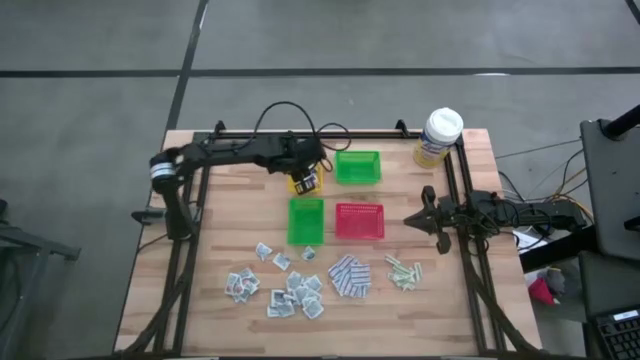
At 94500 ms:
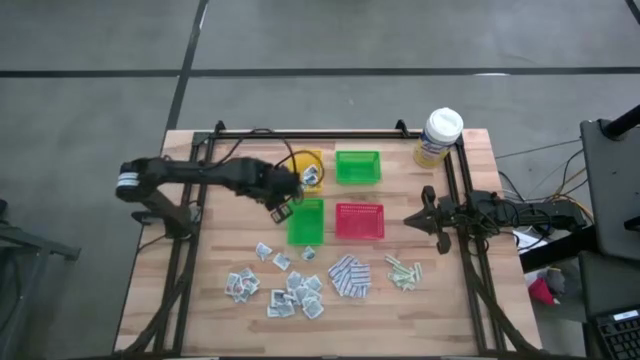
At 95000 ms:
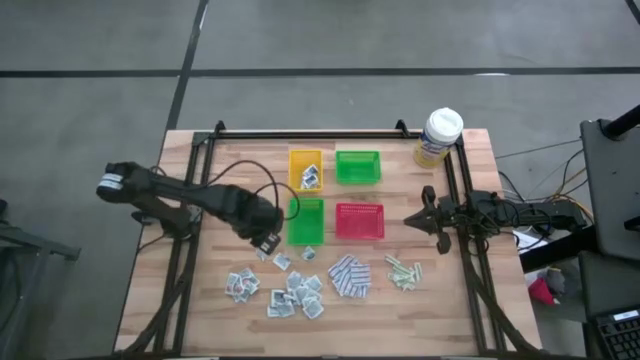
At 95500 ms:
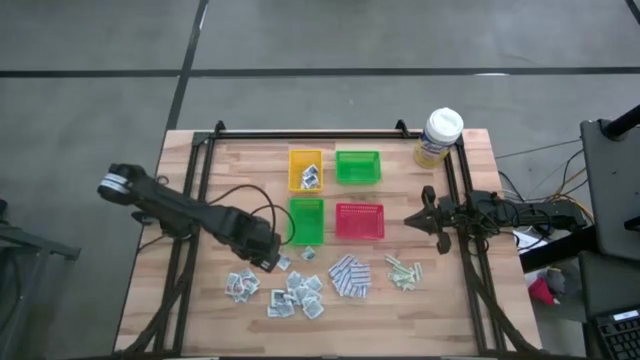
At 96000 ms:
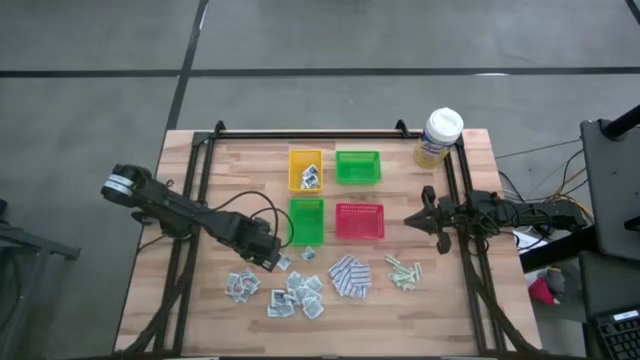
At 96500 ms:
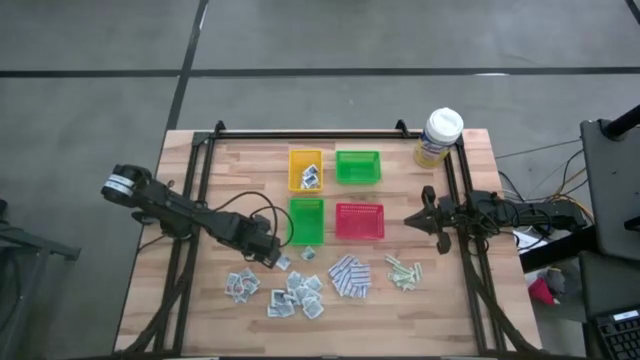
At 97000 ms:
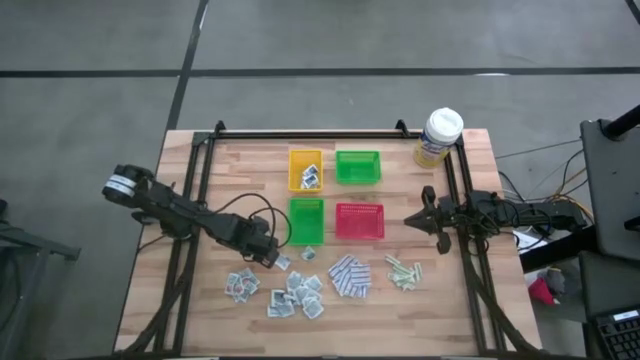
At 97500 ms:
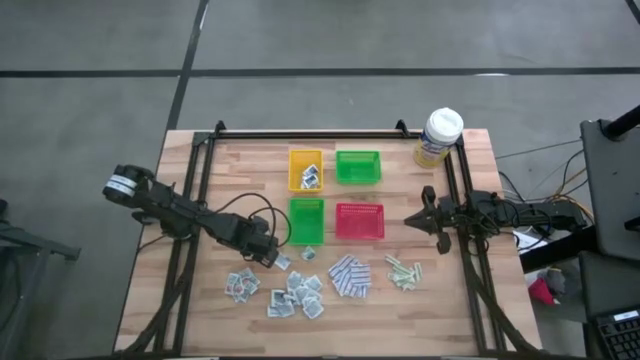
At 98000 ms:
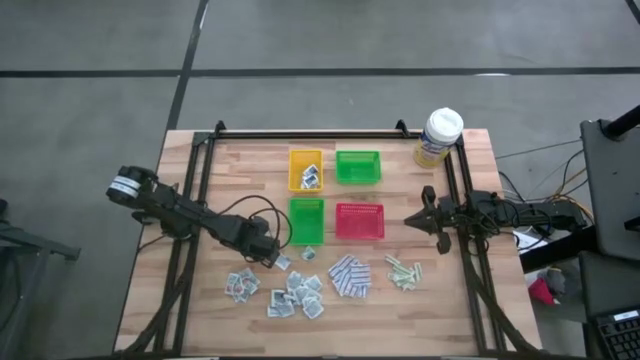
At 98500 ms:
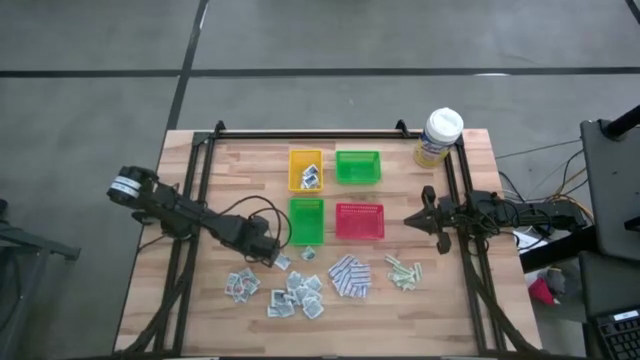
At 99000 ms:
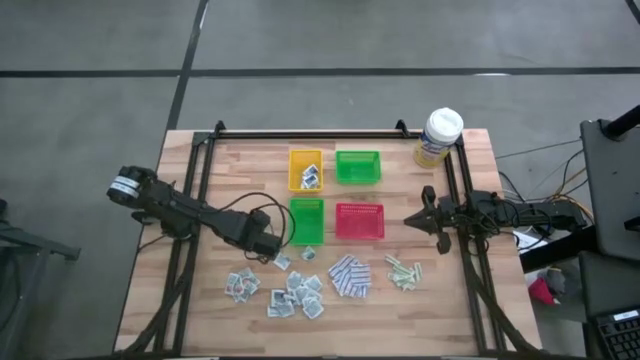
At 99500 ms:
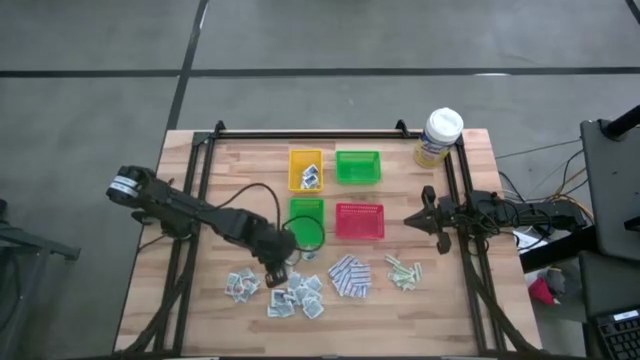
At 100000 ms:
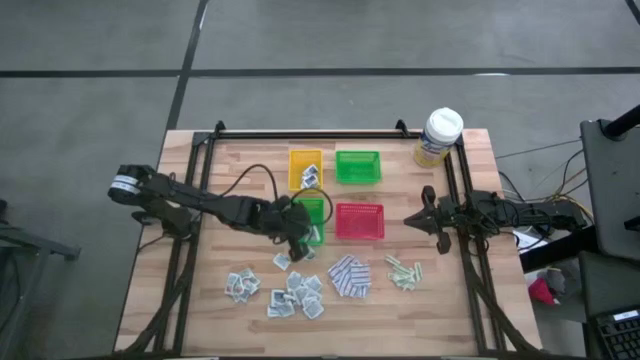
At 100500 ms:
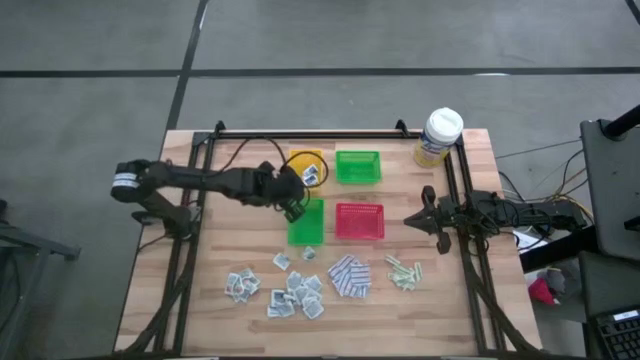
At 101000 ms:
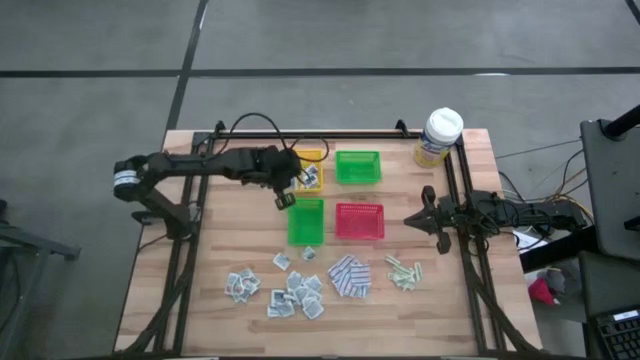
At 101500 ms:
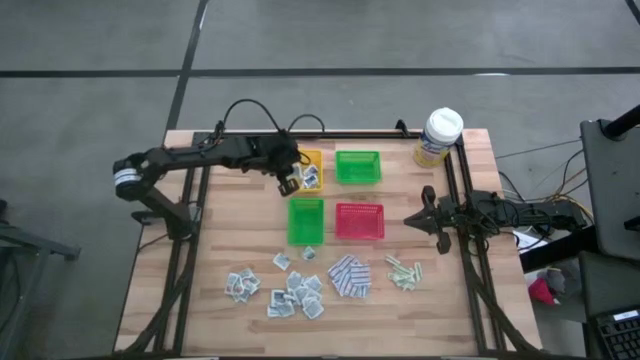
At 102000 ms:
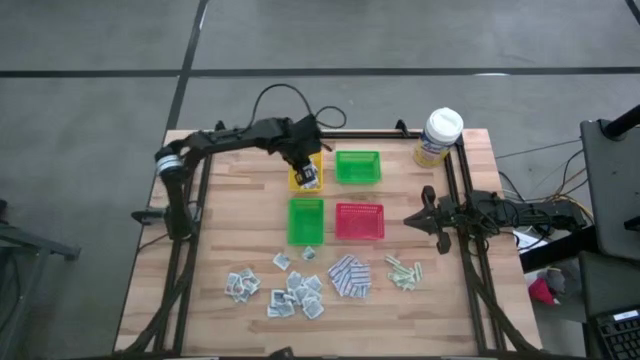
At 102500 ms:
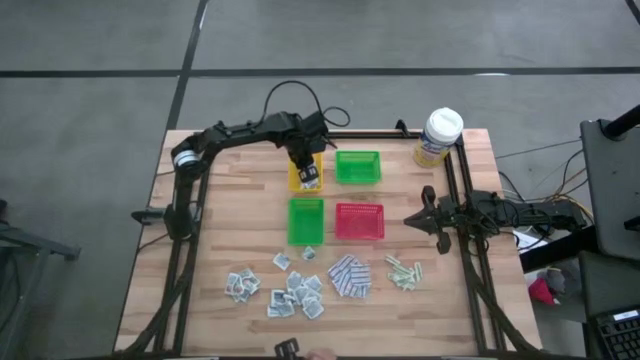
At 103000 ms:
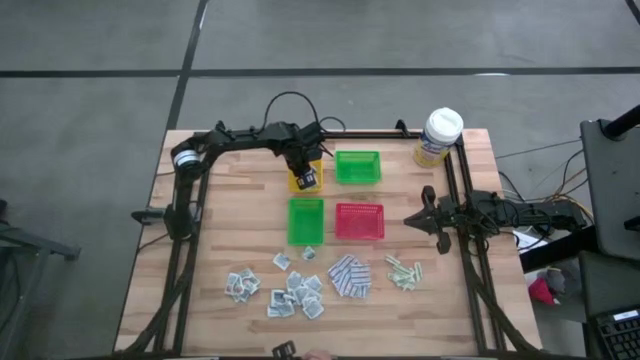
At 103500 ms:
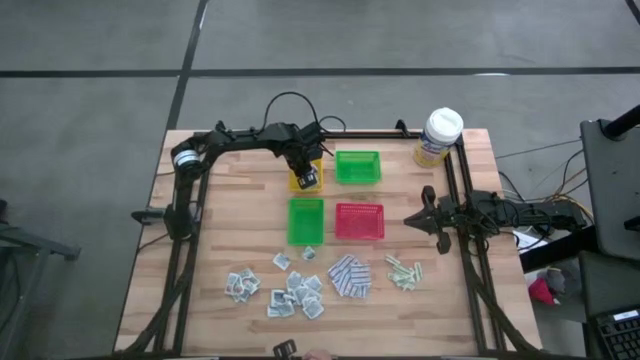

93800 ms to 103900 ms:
Task: Pick & Place First Aid Supplies
Put the blue alcohol pad into the yellow bin

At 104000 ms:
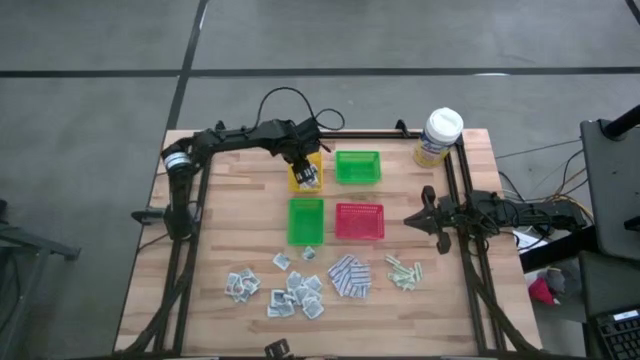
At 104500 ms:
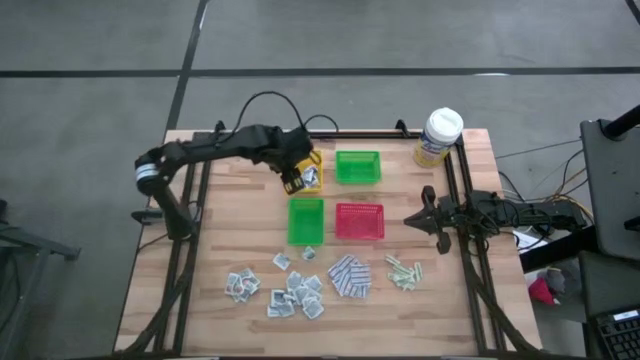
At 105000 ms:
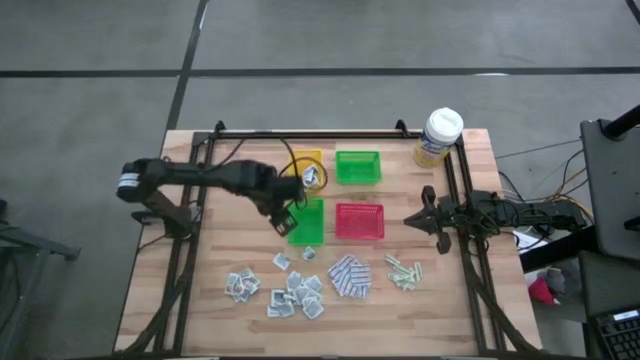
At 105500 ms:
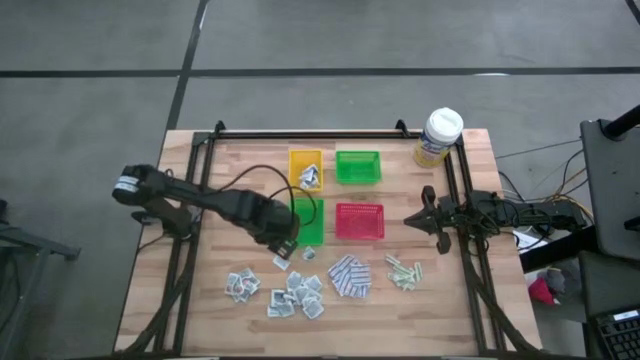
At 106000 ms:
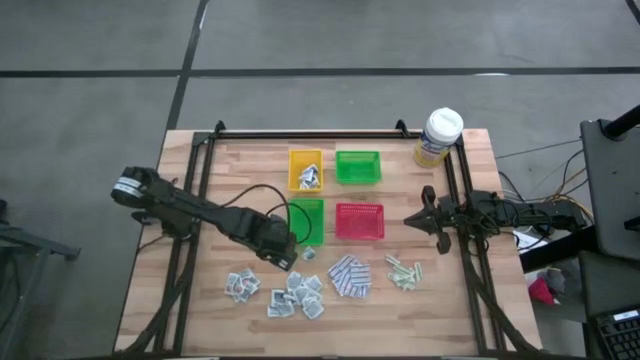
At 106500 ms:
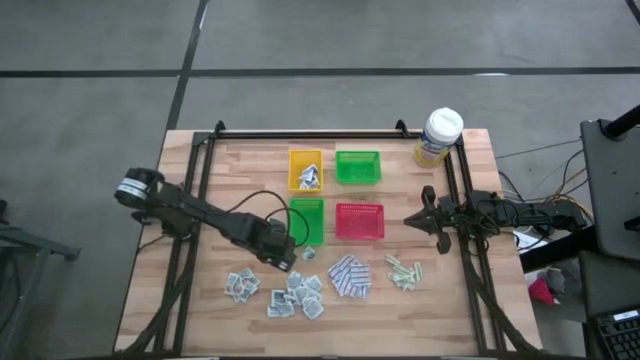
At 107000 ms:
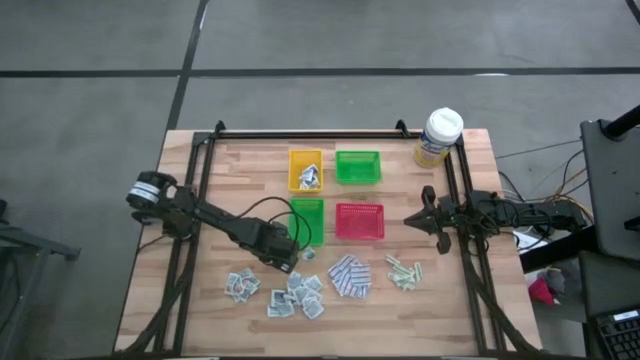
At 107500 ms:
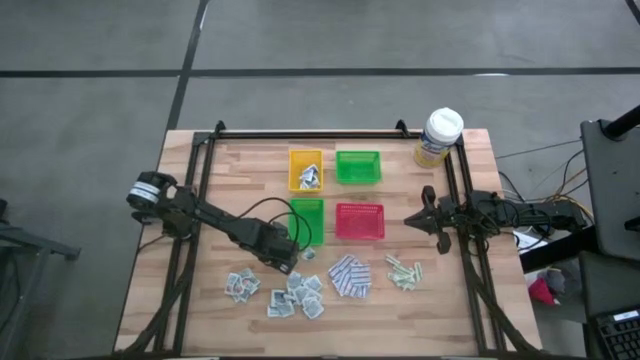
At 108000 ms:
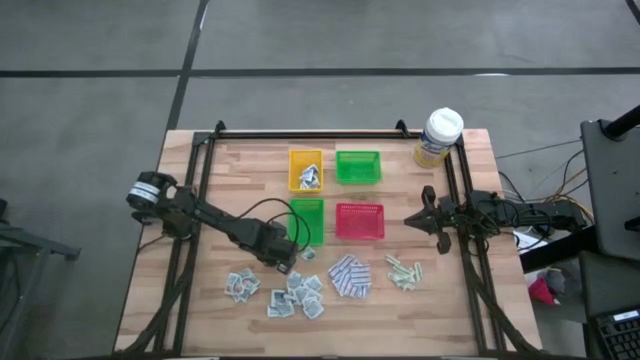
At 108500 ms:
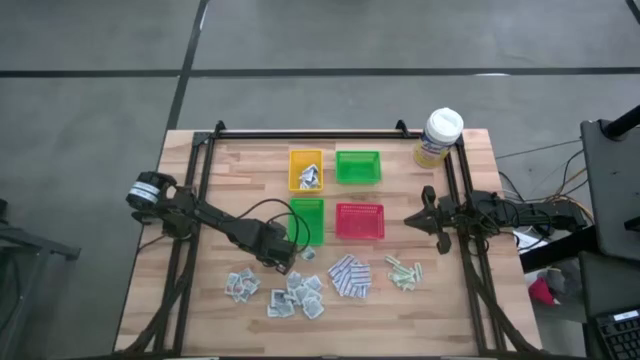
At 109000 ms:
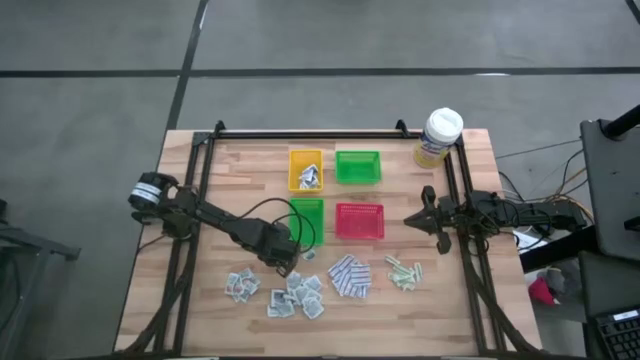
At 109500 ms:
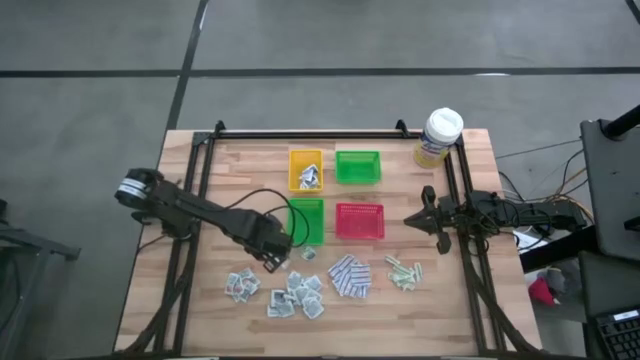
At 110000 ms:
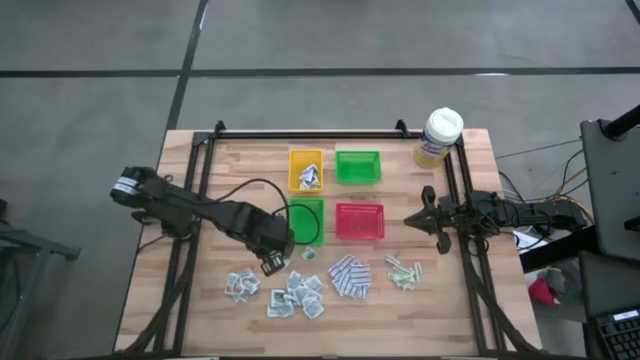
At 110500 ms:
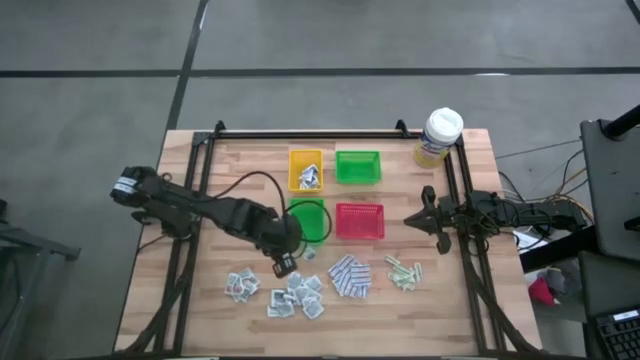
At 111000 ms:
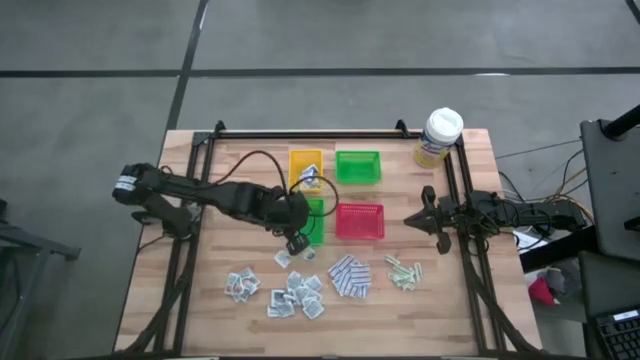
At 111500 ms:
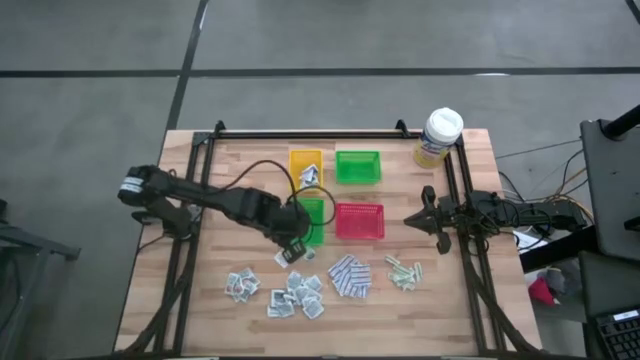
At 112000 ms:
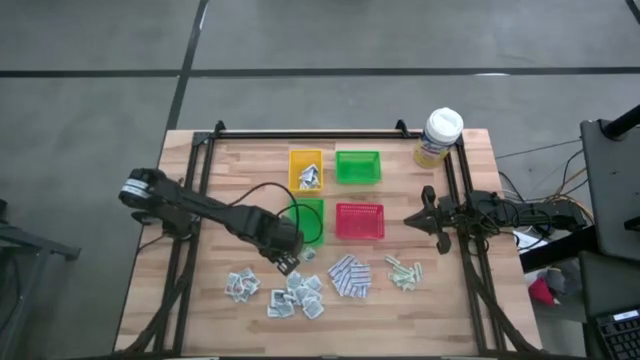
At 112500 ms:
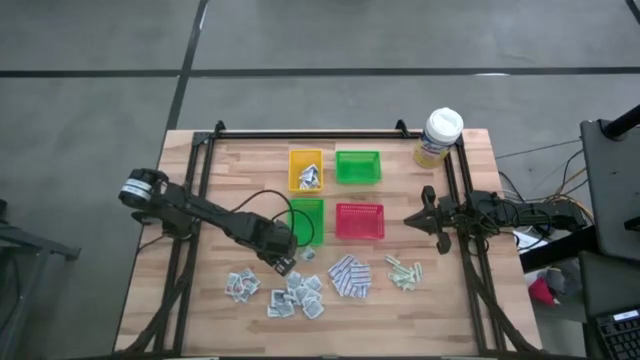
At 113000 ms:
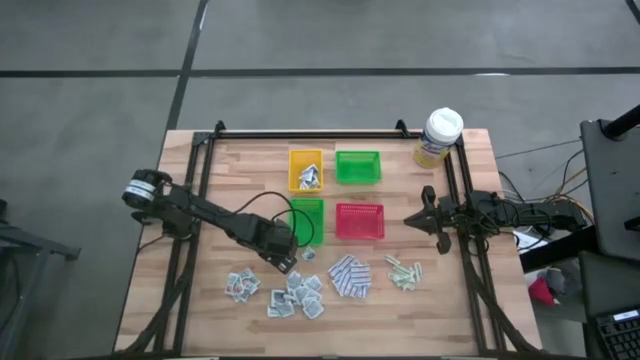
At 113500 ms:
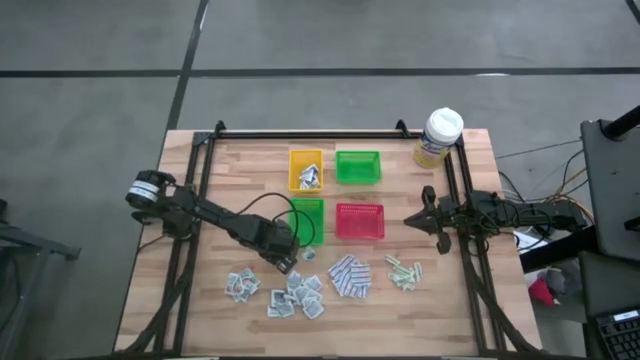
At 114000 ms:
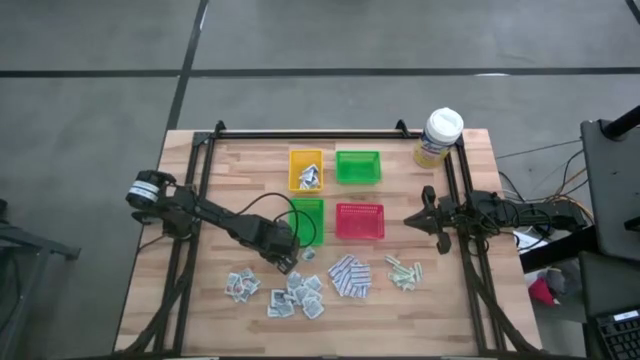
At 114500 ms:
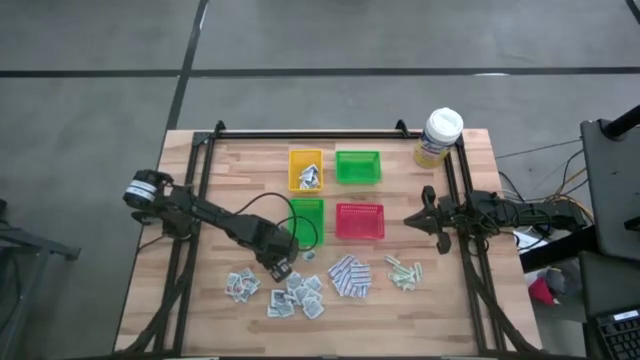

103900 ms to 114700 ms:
Put the blue alcohol pad into the yellow bin

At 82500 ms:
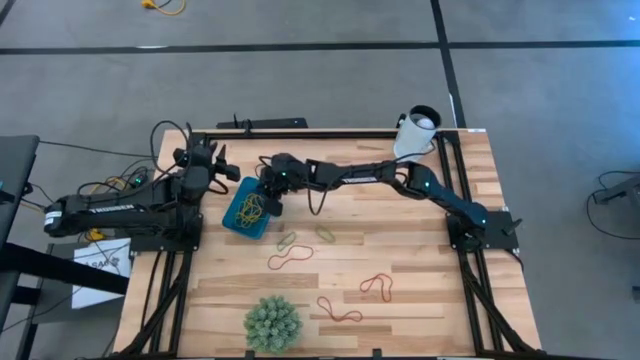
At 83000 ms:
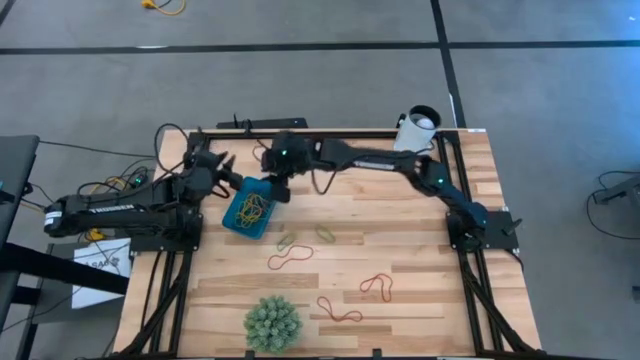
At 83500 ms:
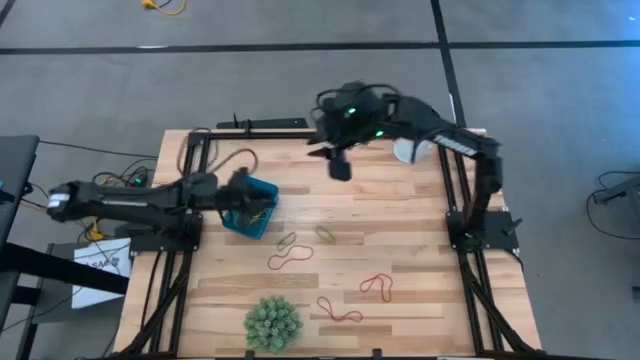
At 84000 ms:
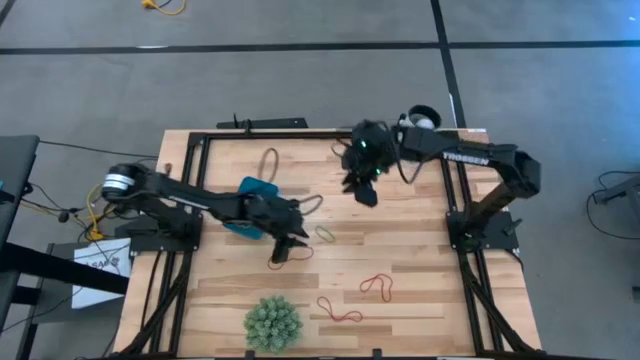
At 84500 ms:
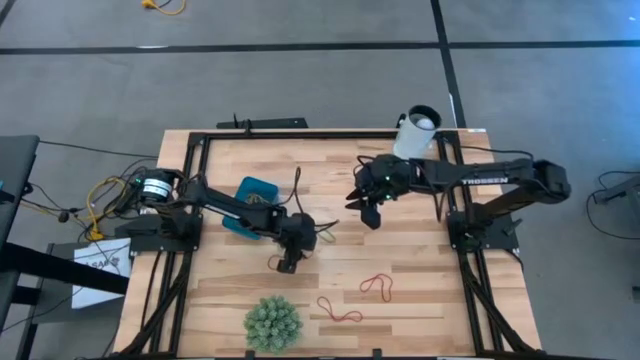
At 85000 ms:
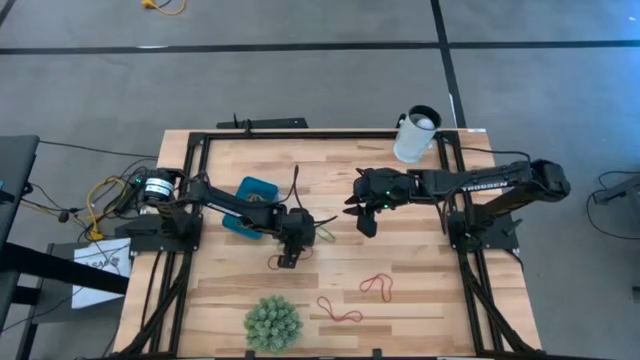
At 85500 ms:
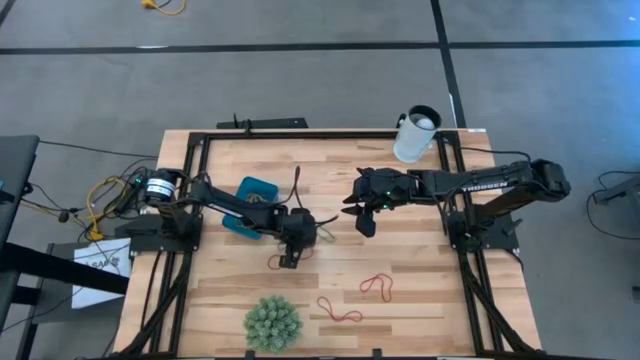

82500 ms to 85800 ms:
Task: Pick and place items into bin
Put the red rubber band into the blue bin
